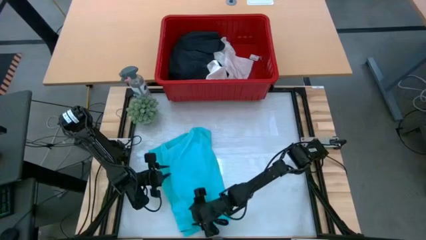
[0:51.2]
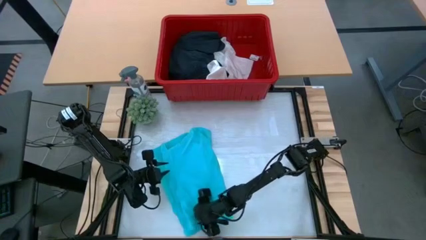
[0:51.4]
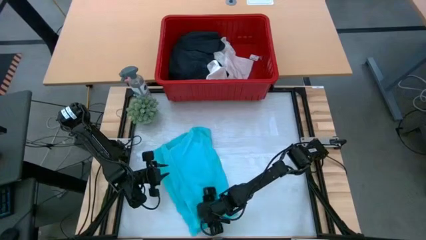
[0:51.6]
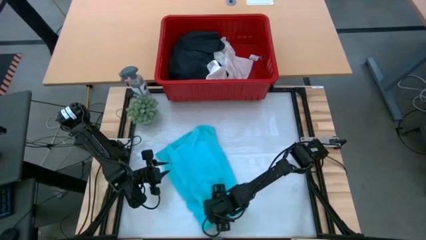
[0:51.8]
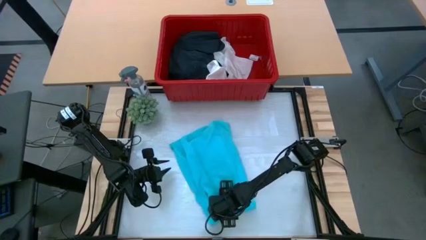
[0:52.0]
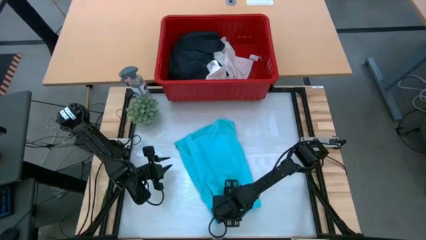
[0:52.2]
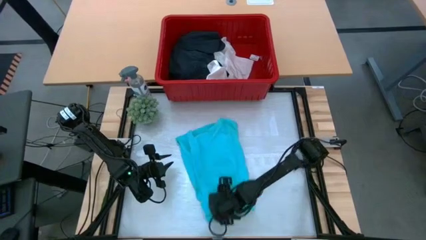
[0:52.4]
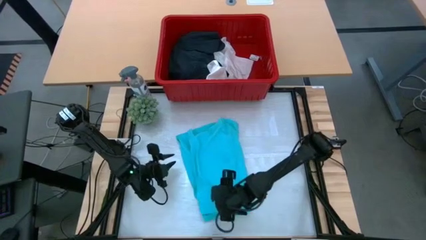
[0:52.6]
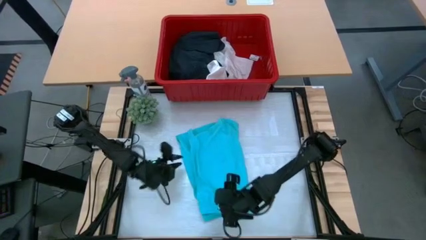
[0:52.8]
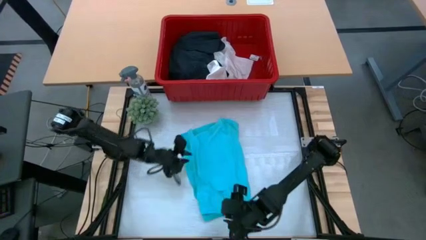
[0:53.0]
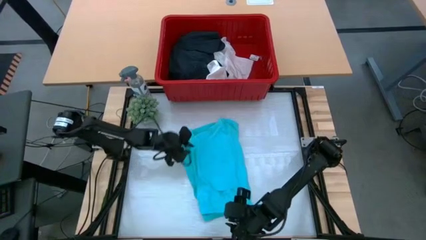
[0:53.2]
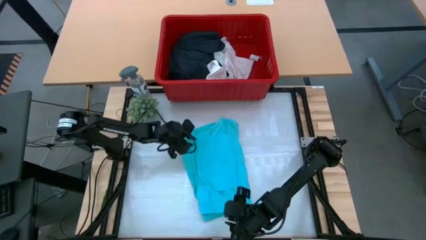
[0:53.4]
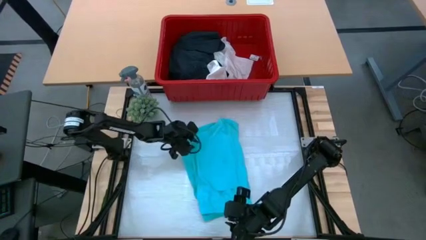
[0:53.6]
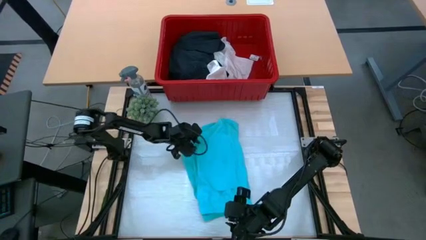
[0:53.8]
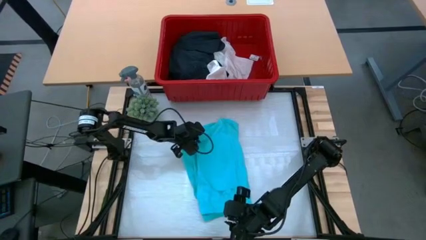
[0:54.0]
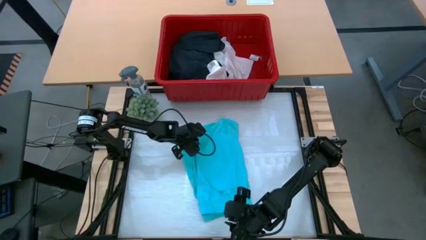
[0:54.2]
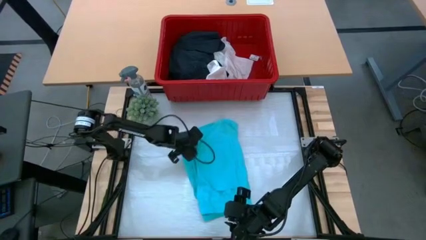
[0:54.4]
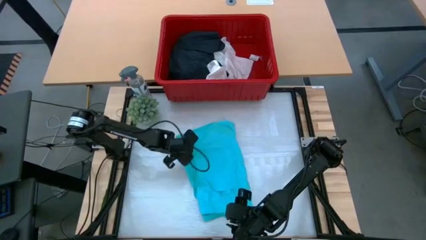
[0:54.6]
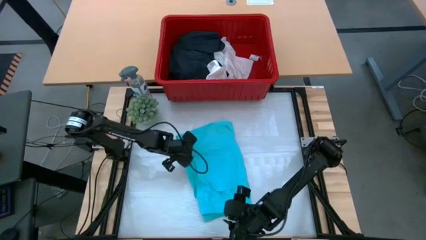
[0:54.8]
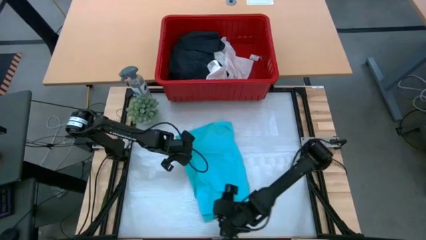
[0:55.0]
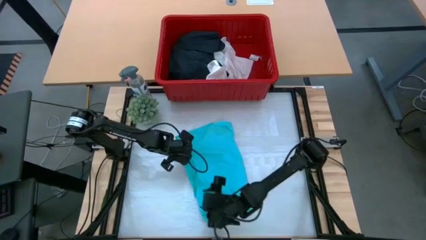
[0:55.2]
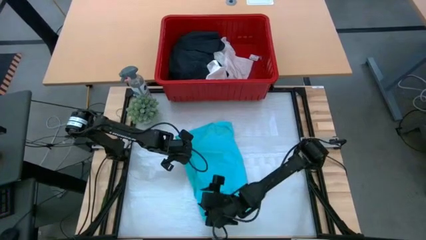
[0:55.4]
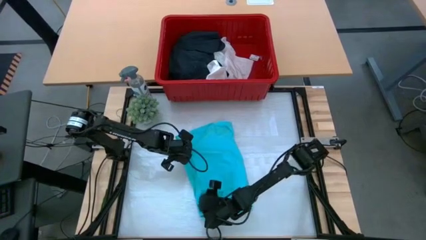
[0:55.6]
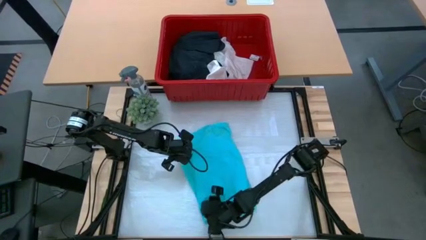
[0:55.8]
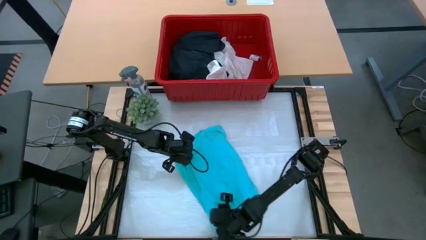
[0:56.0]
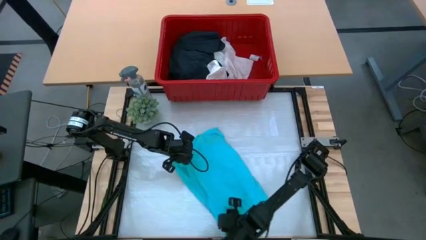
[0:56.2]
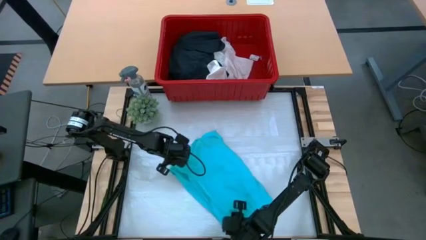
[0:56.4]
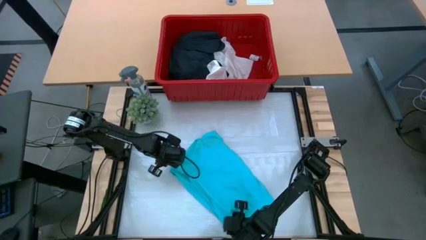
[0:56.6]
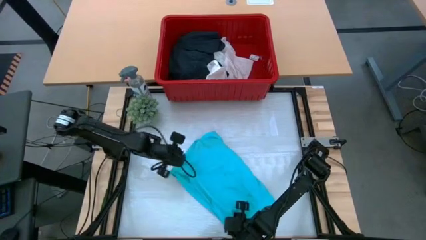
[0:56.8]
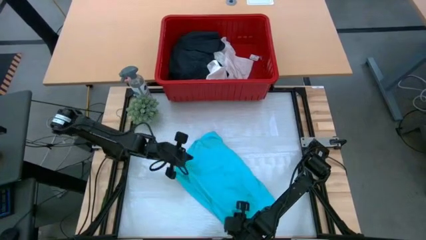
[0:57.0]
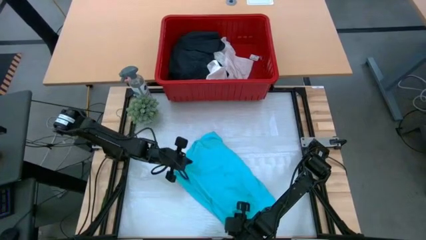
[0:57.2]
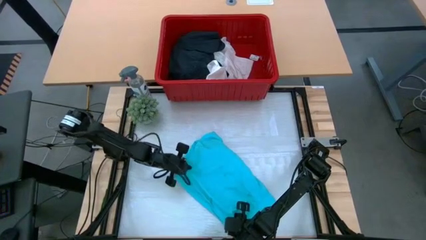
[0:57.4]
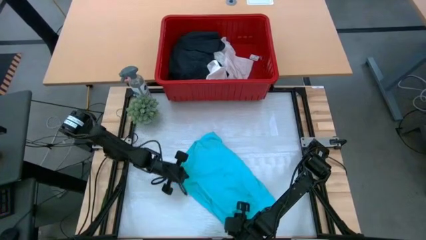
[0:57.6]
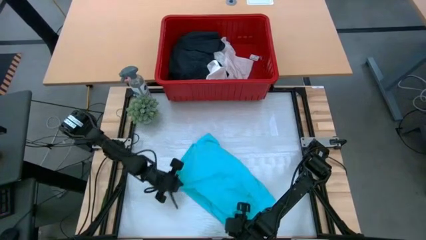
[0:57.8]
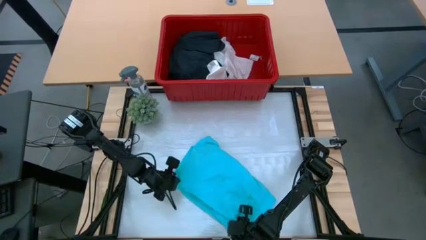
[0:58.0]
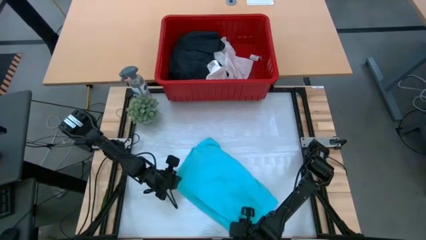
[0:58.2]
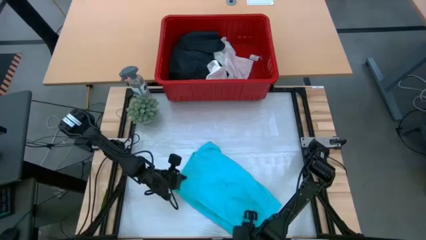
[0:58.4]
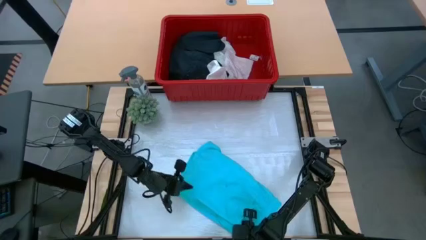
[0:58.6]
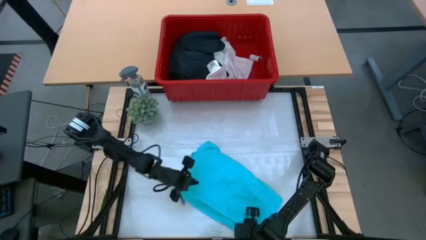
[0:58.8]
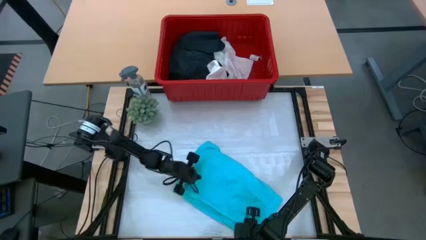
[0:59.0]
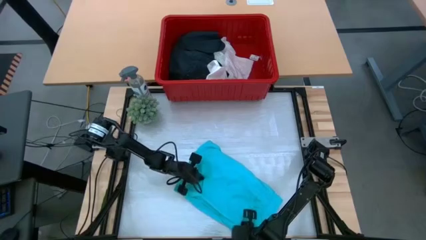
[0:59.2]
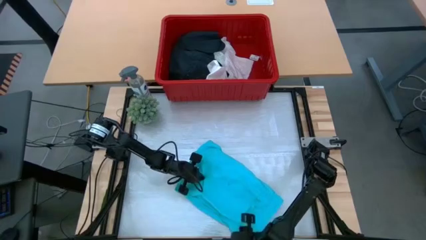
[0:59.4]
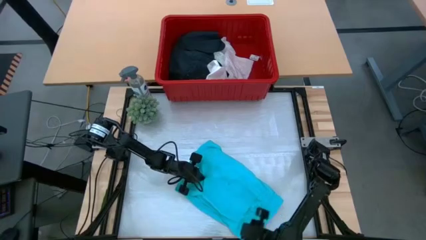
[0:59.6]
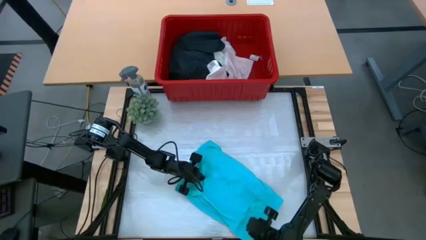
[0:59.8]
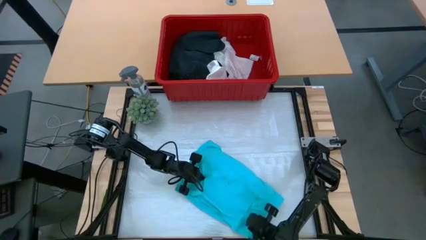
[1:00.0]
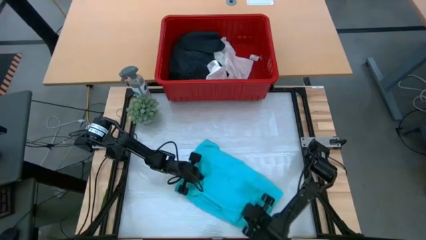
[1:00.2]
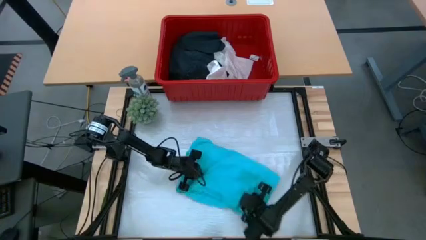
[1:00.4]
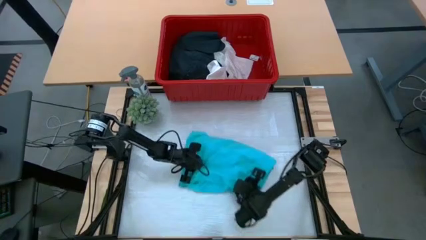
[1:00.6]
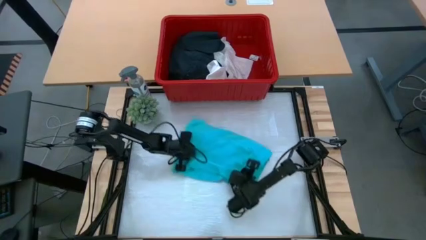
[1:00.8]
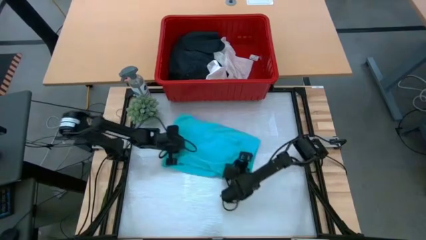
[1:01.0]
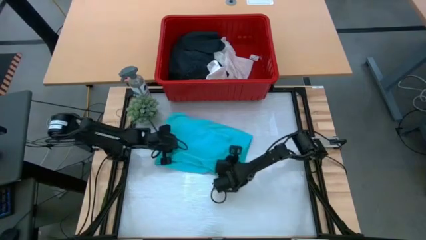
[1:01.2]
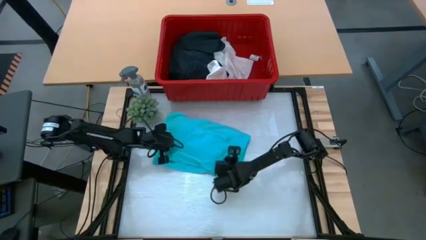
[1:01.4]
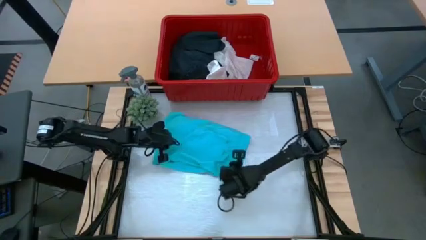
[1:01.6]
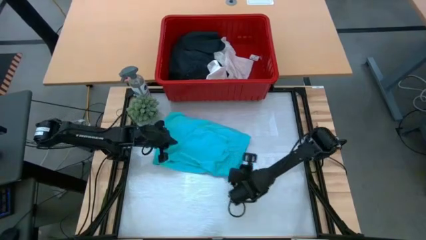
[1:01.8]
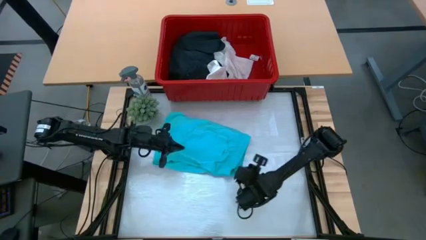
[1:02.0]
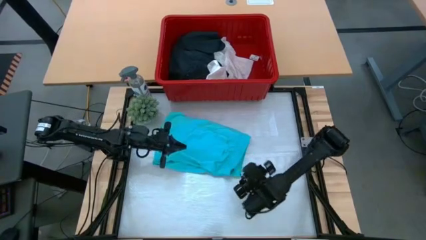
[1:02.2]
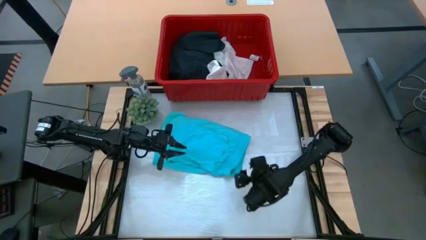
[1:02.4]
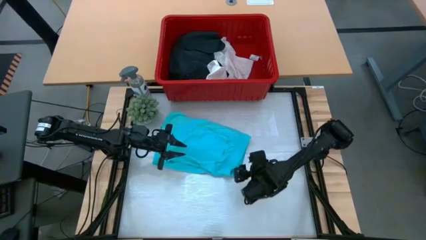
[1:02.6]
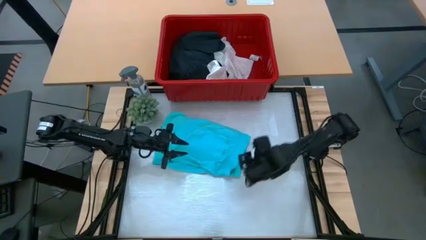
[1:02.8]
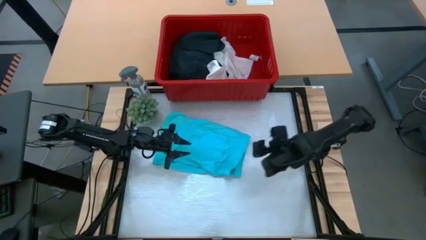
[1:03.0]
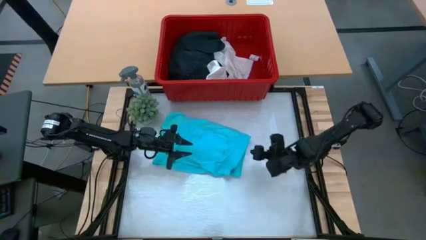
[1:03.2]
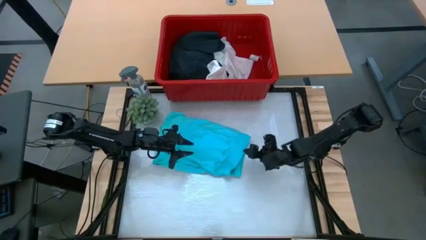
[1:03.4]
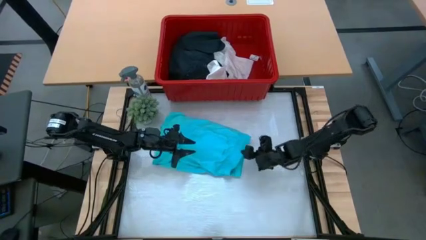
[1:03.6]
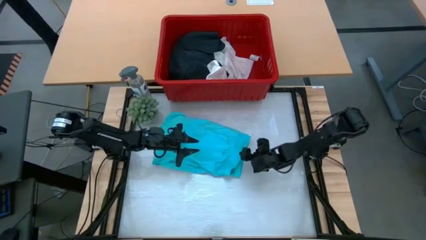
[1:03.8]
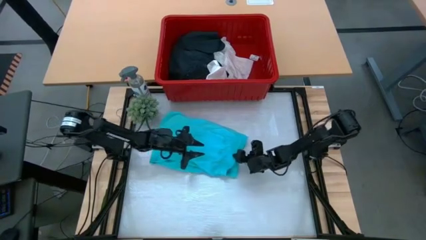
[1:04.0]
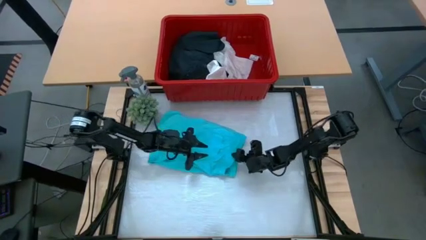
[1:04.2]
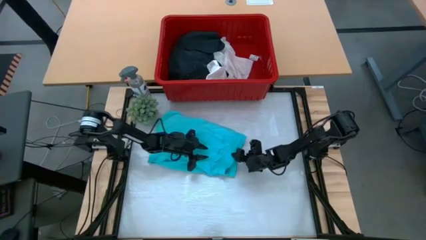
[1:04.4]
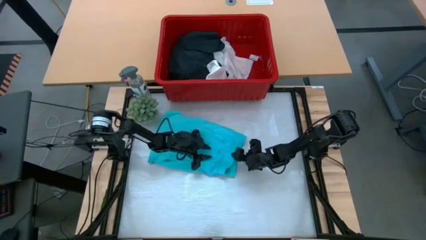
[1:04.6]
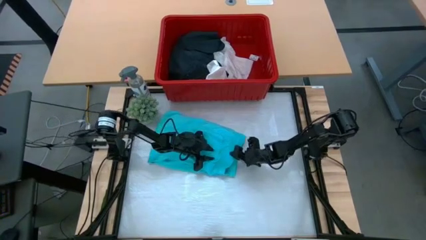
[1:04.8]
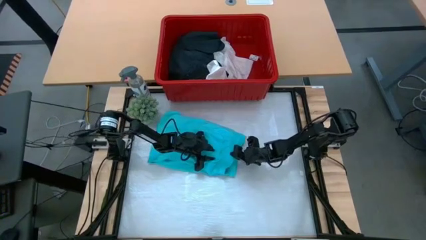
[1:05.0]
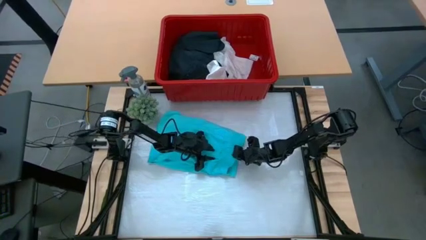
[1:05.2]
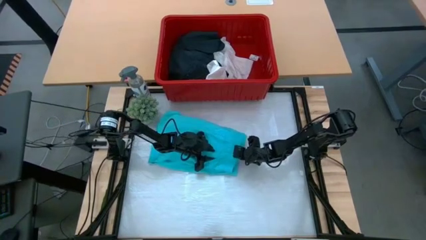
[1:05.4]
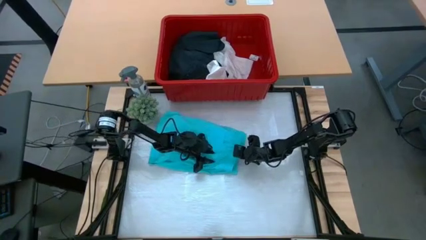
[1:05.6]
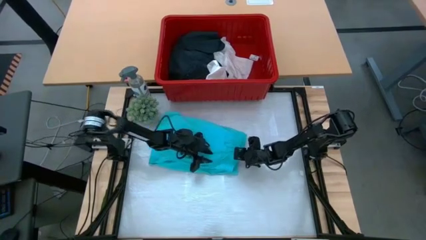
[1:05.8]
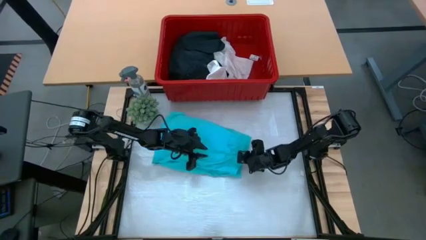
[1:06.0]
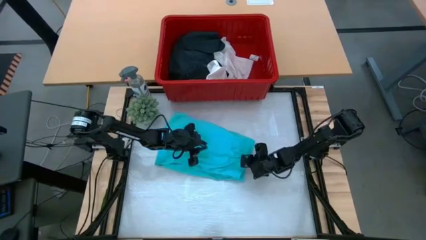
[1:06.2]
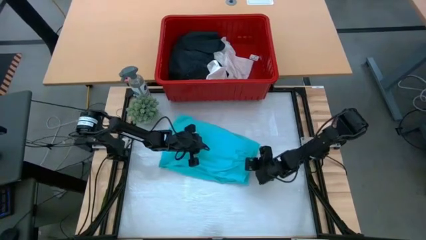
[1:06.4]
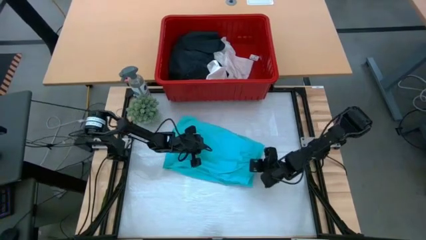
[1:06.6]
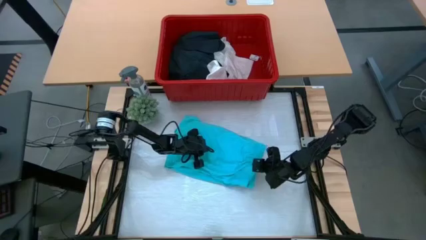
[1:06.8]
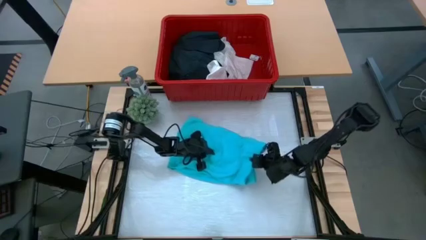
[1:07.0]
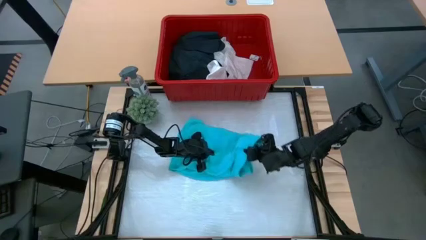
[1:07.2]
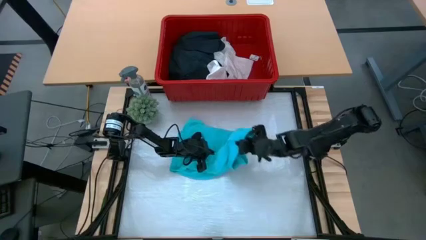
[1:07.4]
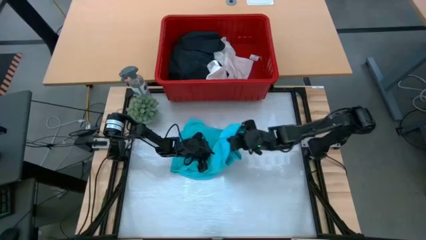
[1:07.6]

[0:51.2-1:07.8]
Task: Fold Laundry from Bin
Fold the blue shorts
